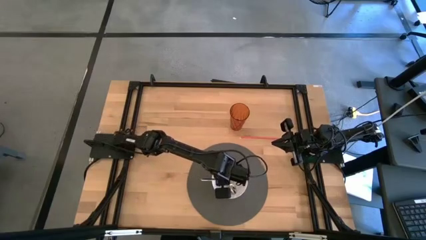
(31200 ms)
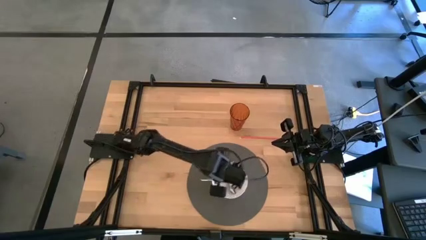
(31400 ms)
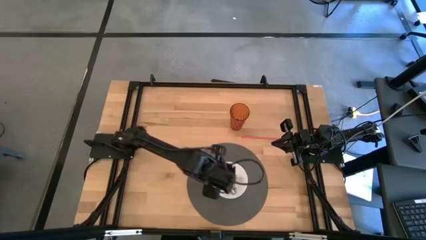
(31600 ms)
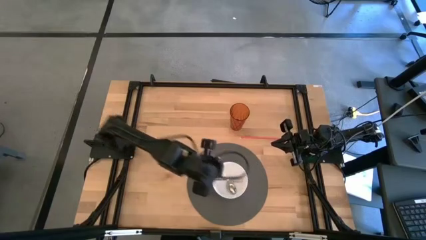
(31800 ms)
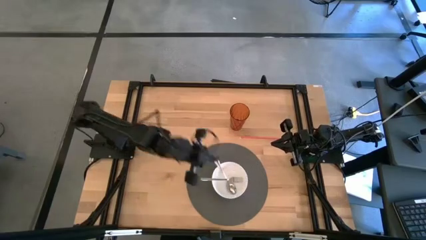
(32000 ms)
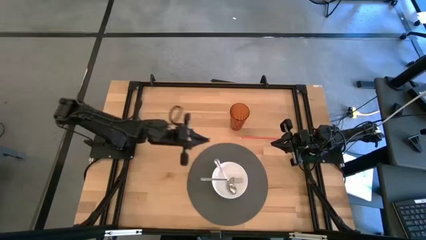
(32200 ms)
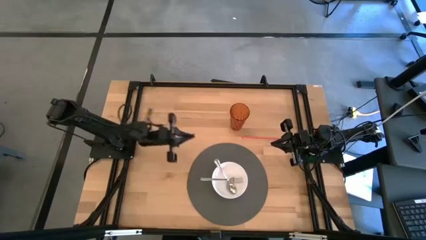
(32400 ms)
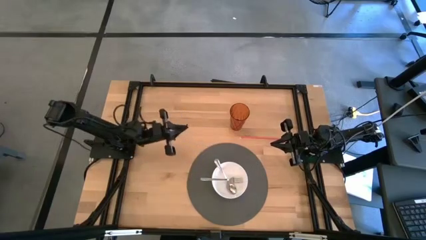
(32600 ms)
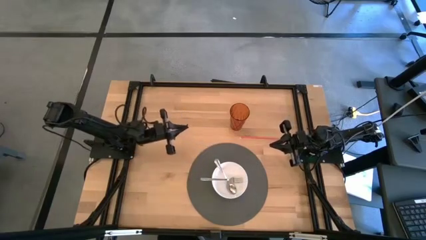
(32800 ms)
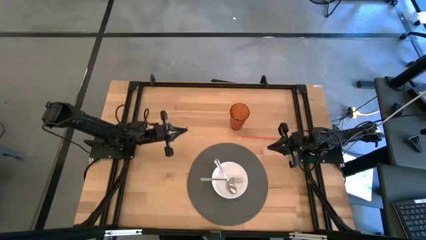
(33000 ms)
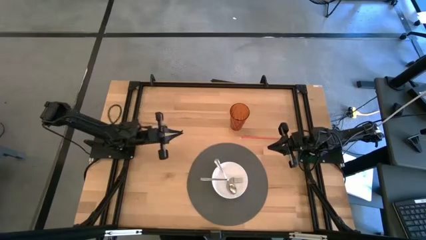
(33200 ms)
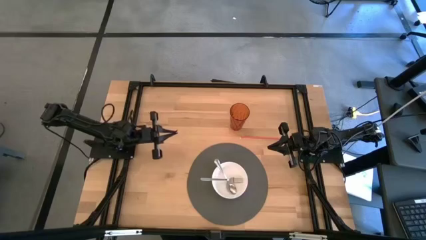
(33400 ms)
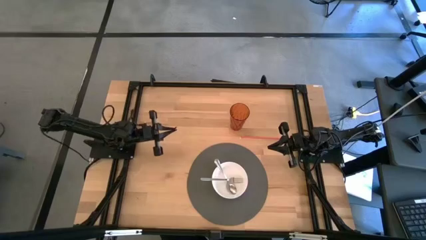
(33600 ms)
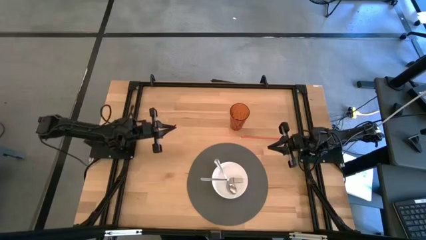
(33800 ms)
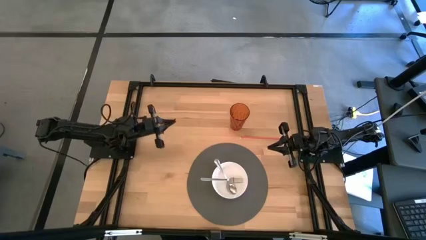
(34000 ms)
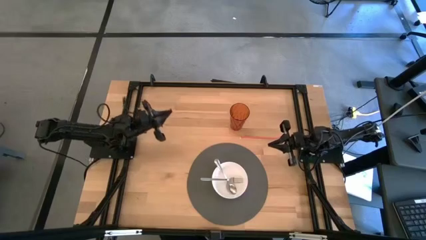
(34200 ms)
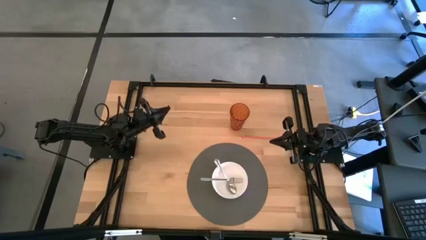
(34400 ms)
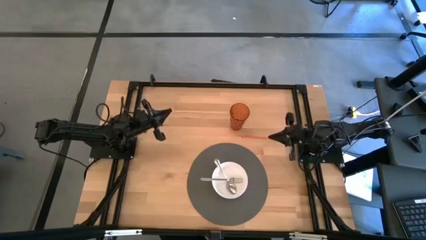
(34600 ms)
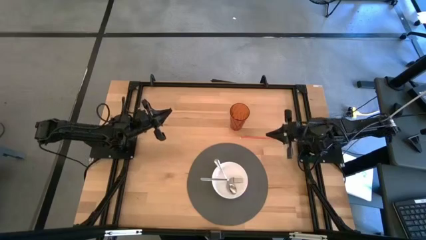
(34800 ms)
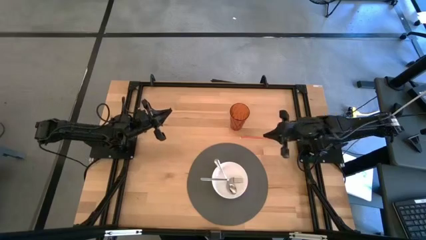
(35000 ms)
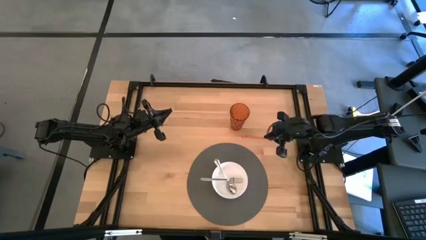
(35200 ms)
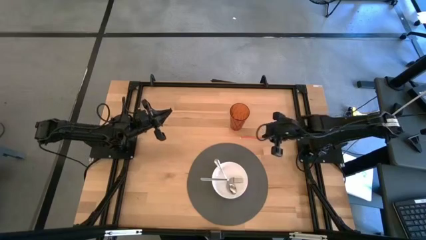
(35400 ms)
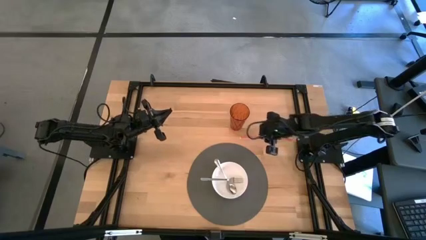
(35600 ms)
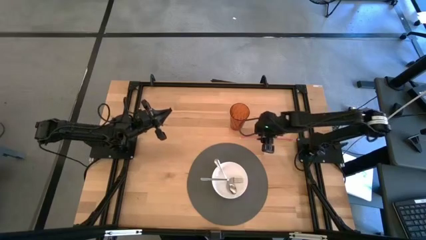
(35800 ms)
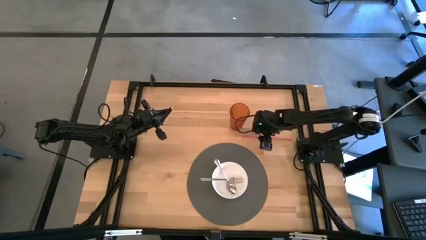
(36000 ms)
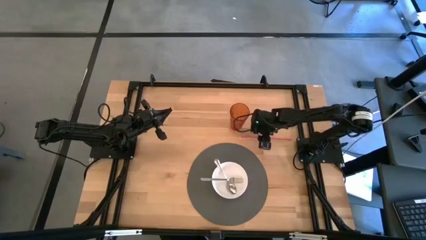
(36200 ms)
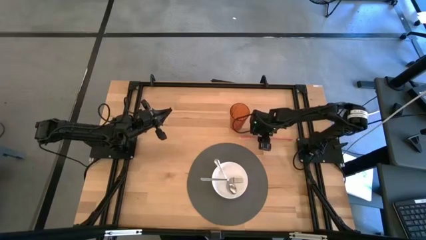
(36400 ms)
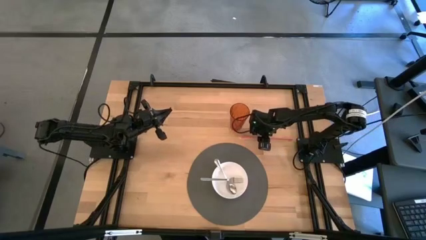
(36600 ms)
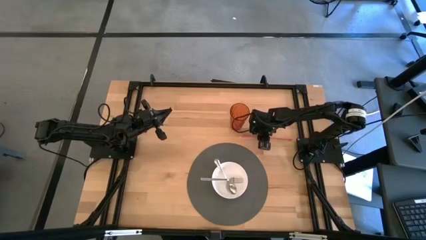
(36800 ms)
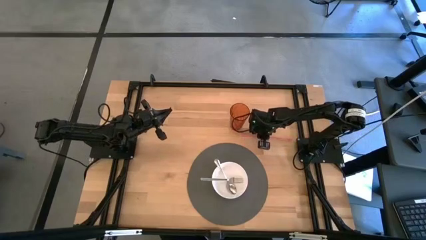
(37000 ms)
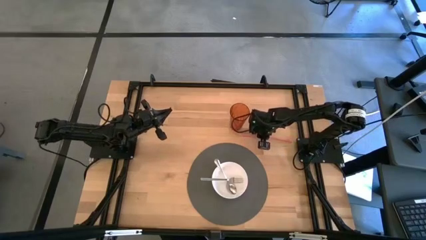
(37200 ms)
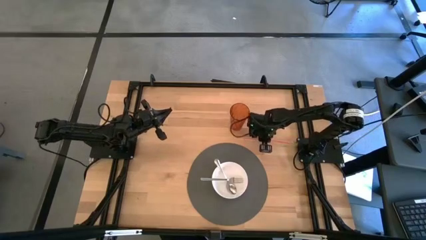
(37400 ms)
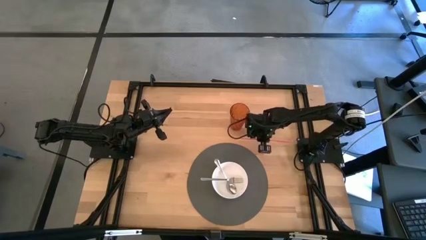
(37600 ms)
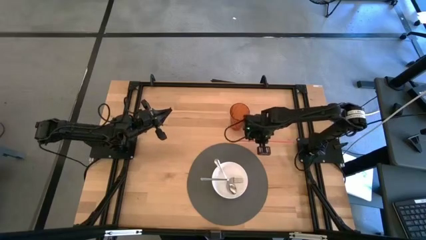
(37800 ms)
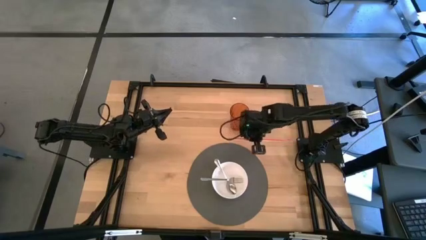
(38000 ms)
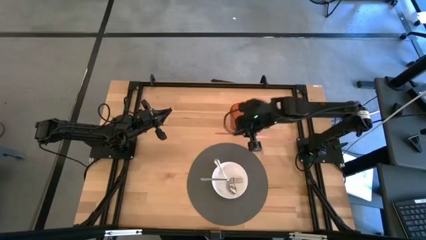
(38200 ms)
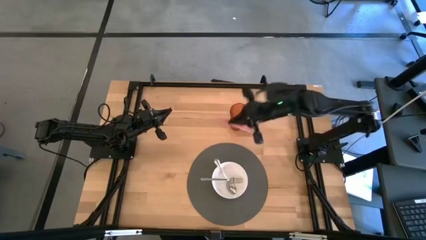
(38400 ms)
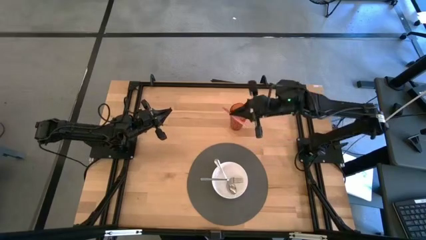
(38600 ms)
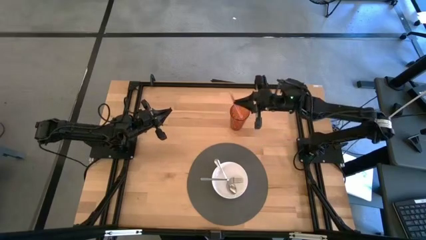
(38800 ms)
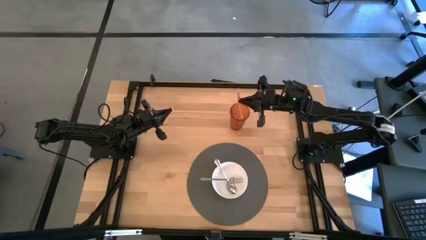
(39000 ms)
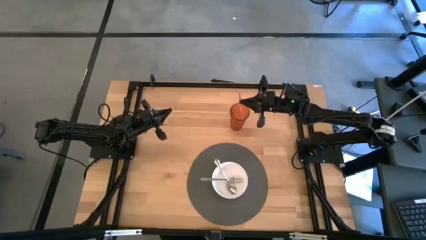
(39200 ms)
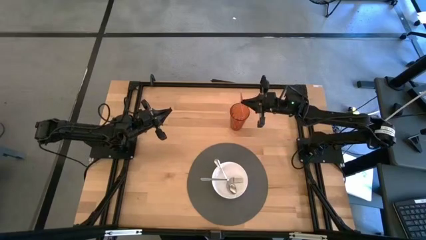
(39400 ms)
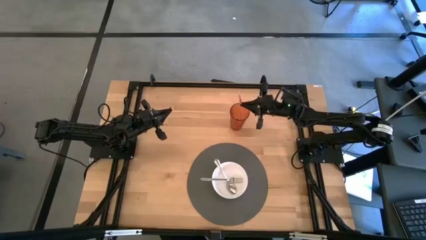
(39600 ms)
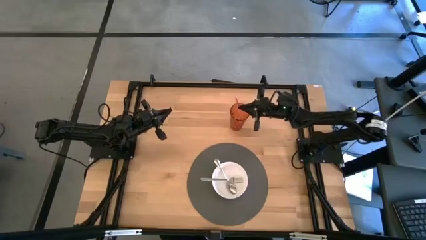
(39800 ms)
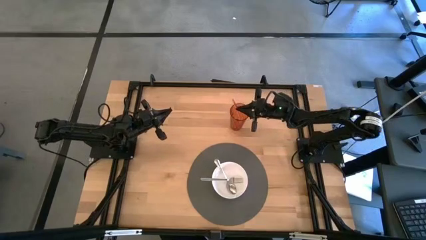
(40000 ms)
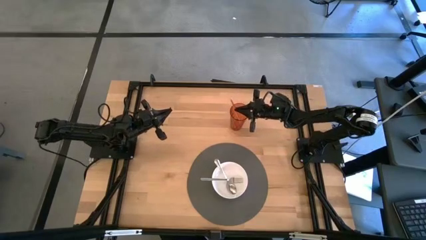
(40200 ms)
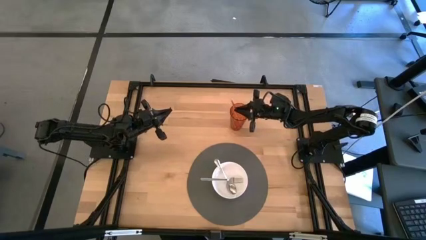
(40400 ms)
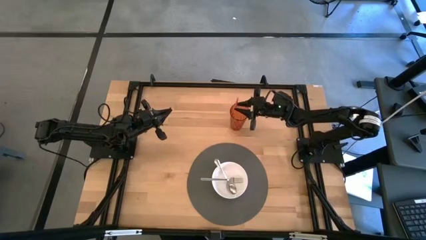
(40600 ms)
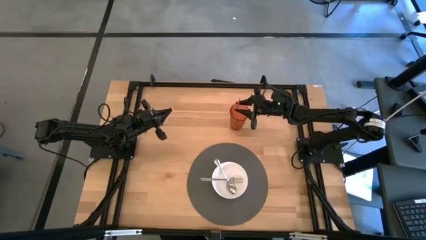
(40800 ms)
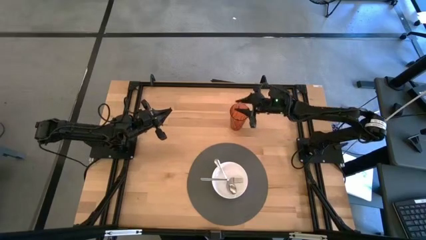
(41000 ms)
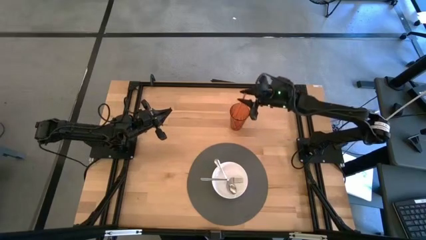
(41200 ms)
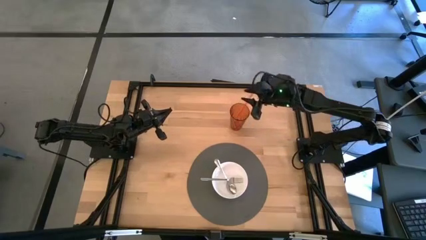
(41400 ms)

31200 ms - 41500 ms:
Task: Pick & Place Utensil
Put the orange straw into the orange cup

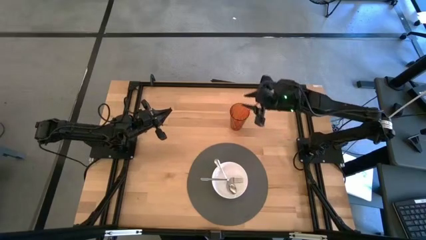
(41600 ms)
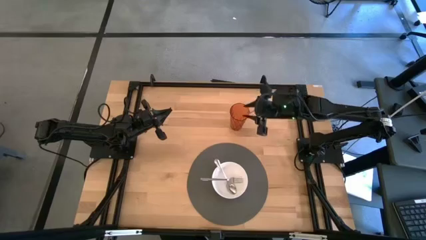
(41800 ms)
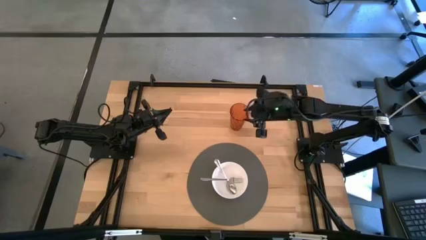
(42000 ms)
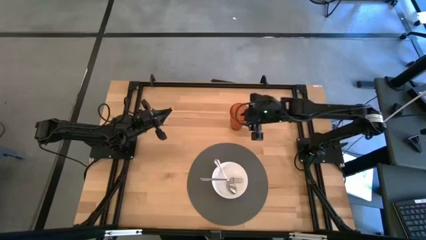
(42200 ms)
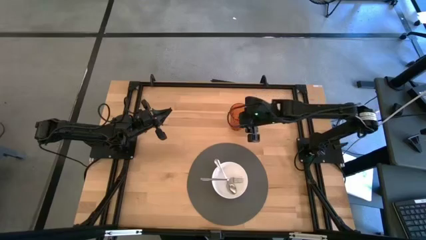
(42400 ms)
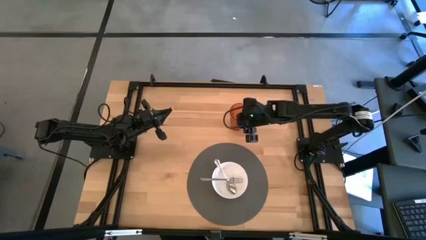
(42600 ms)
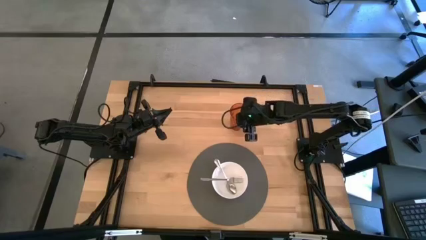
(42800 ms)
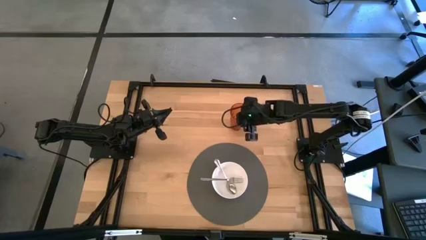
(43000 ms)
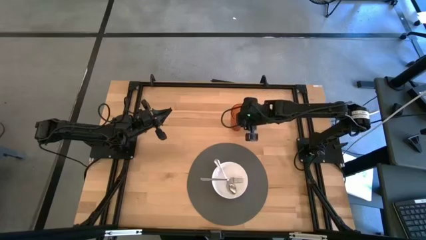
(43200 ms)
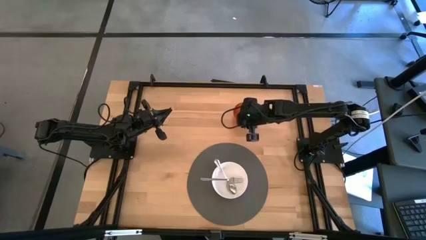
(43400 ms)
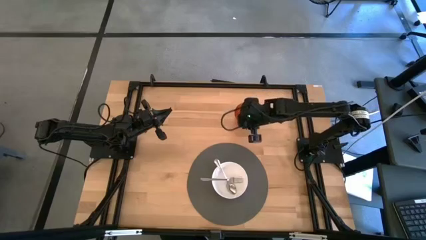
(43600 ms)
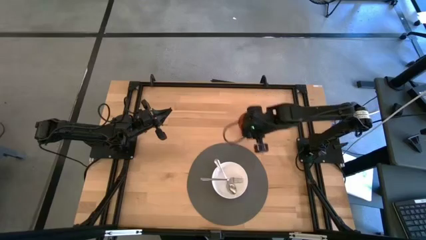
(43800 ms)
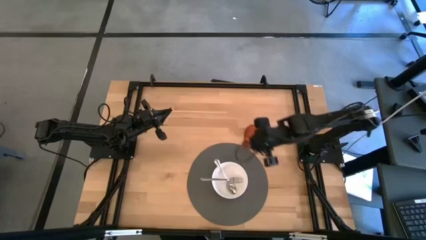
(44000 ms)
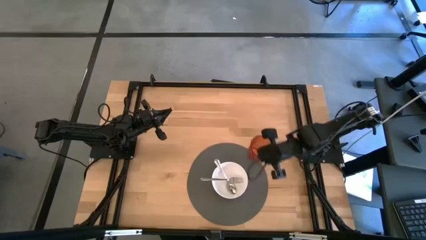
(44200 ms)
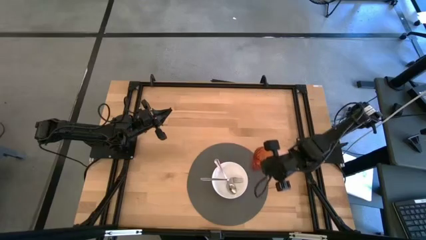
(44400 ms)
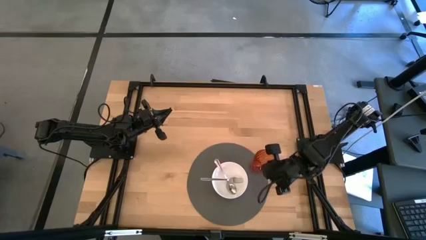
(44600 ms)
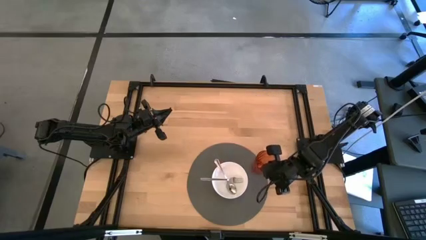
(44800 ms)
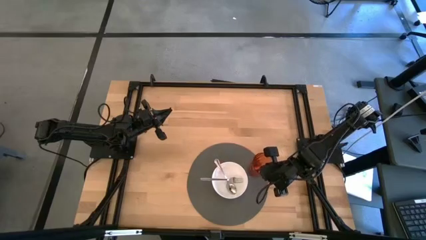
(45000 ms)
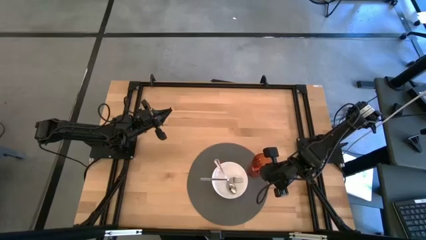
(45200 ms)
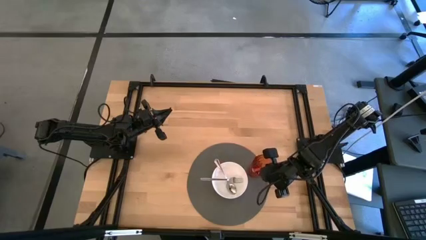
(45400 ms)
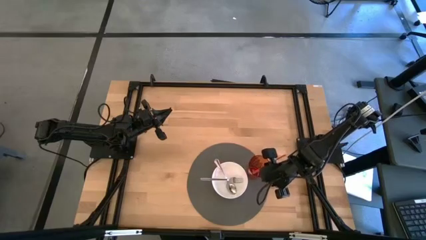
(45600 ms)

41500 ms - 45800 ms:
Put the orange cup on the gray mat to the right of the white bowl
